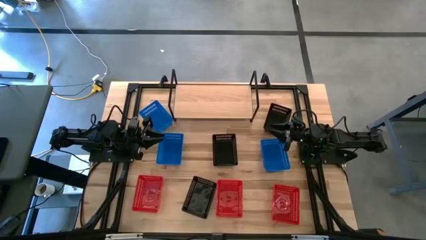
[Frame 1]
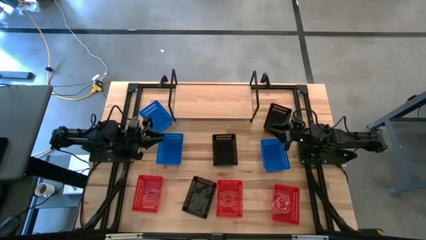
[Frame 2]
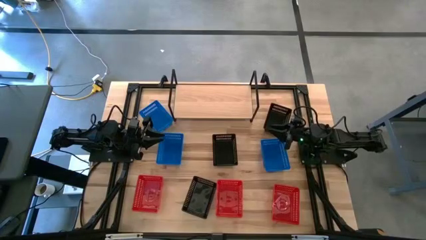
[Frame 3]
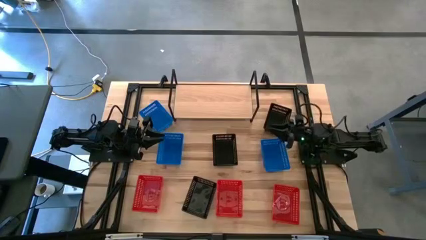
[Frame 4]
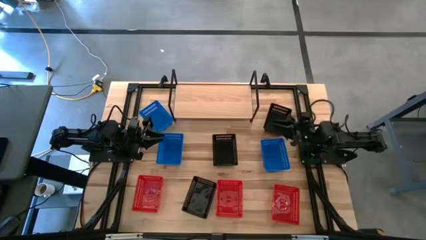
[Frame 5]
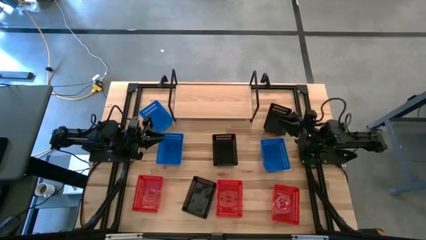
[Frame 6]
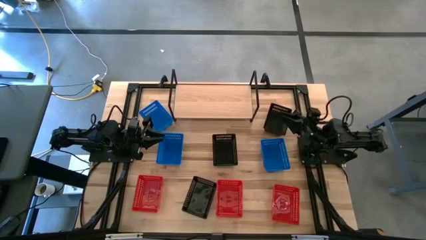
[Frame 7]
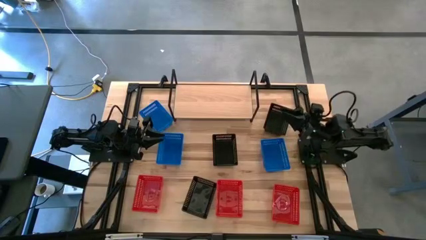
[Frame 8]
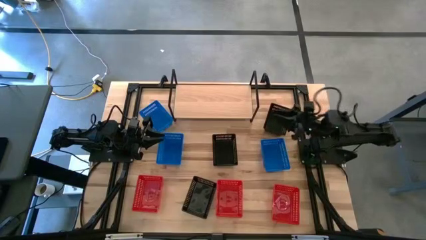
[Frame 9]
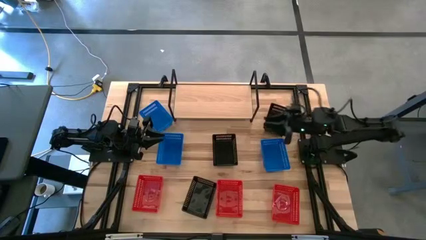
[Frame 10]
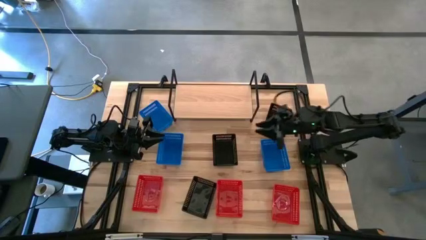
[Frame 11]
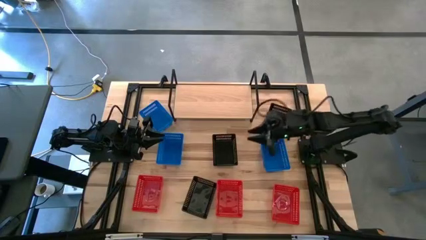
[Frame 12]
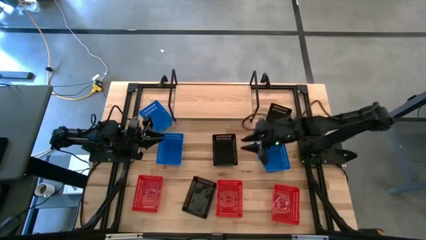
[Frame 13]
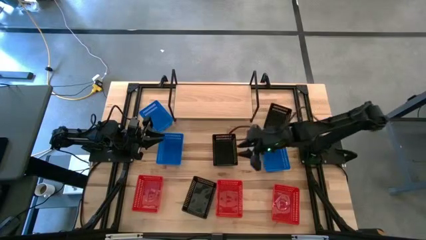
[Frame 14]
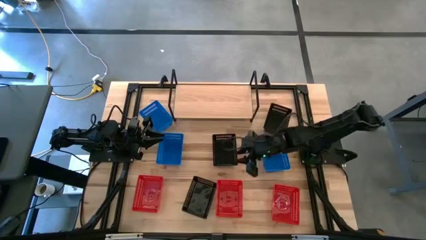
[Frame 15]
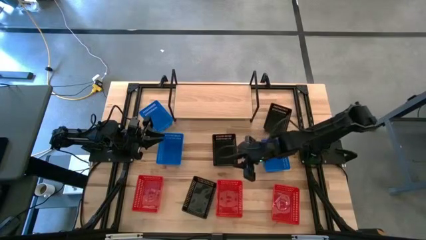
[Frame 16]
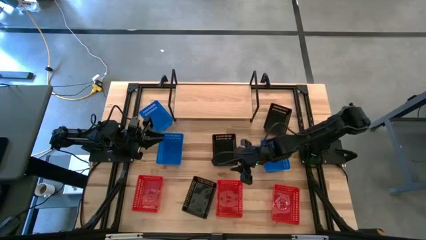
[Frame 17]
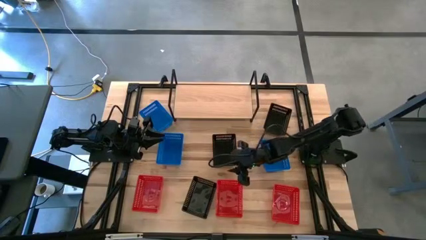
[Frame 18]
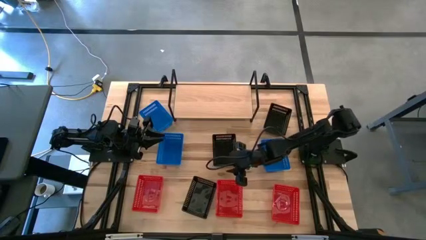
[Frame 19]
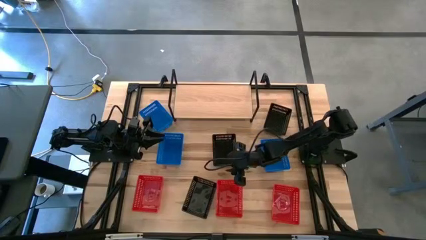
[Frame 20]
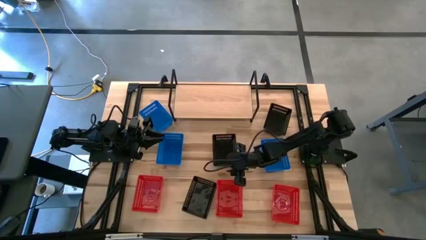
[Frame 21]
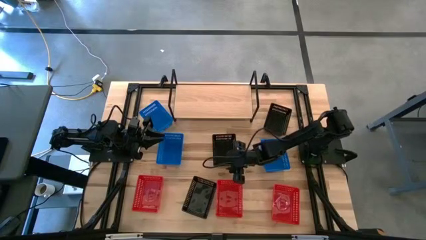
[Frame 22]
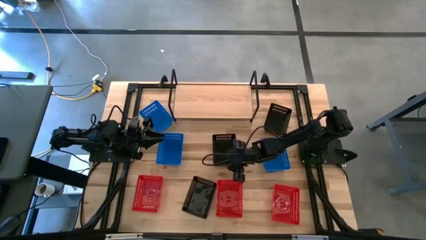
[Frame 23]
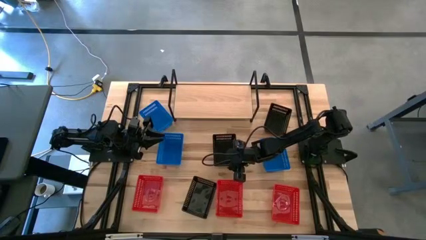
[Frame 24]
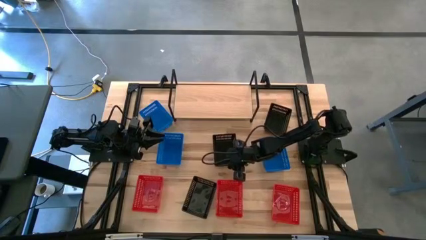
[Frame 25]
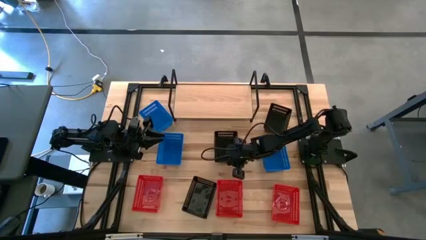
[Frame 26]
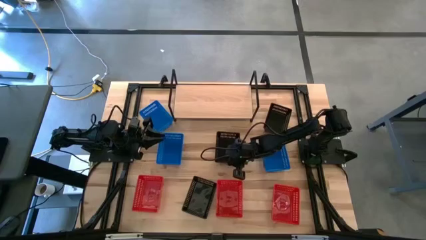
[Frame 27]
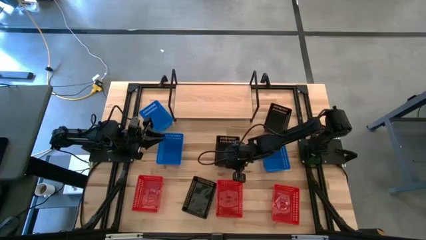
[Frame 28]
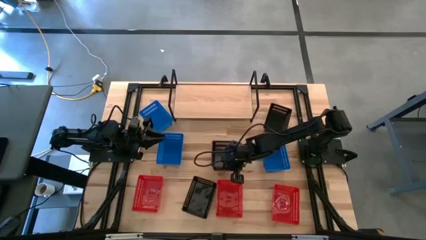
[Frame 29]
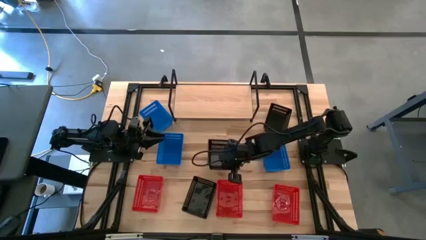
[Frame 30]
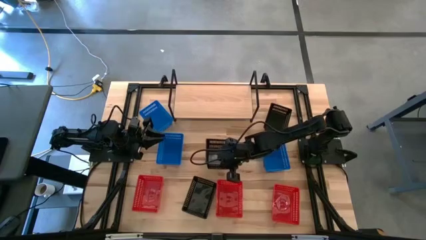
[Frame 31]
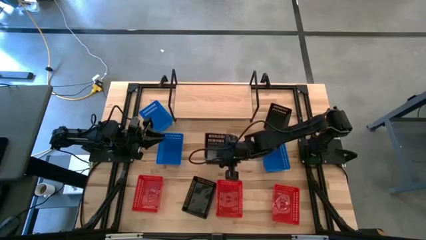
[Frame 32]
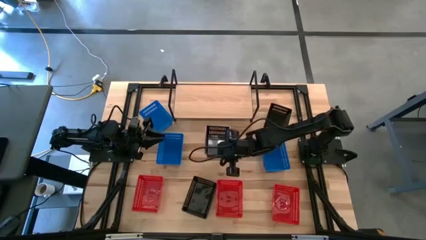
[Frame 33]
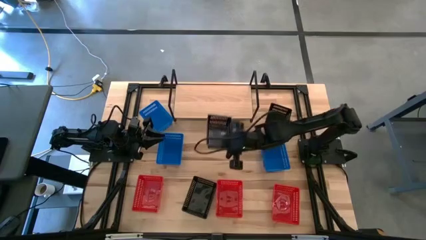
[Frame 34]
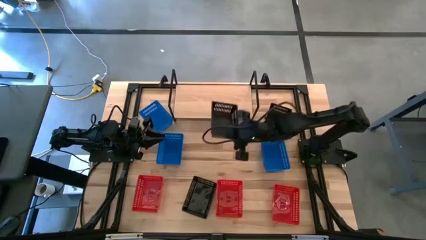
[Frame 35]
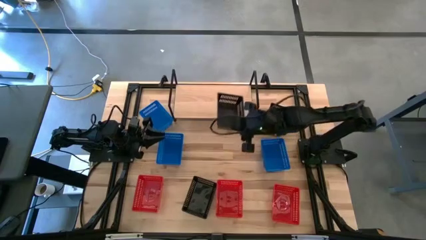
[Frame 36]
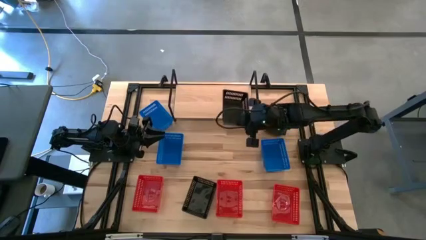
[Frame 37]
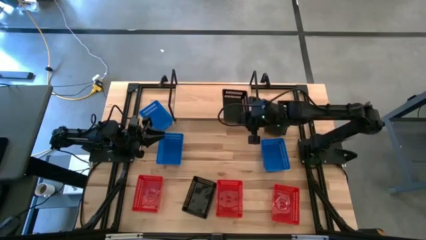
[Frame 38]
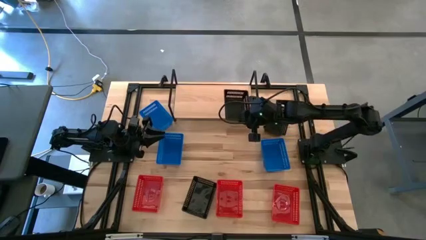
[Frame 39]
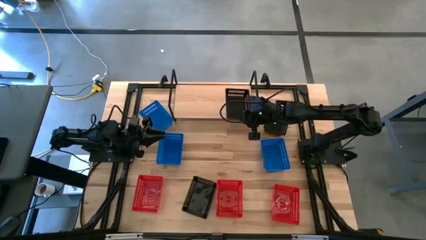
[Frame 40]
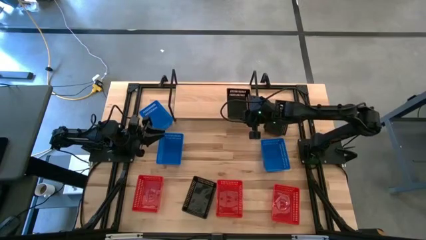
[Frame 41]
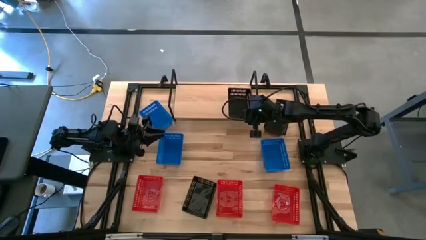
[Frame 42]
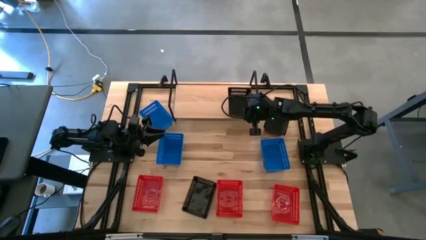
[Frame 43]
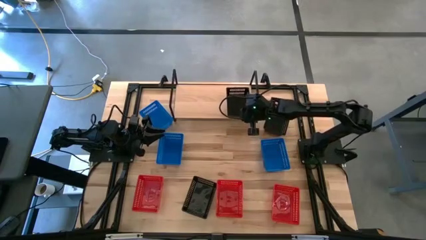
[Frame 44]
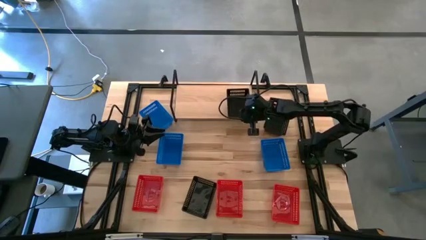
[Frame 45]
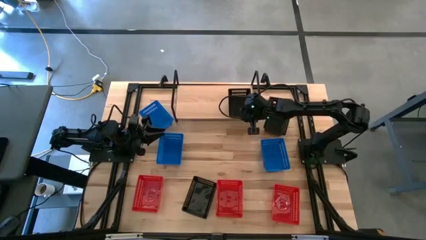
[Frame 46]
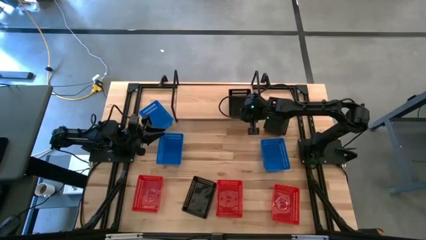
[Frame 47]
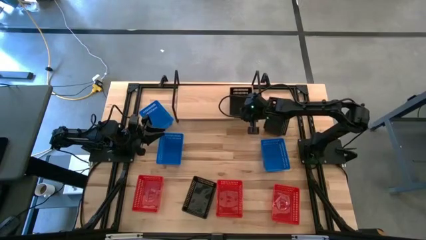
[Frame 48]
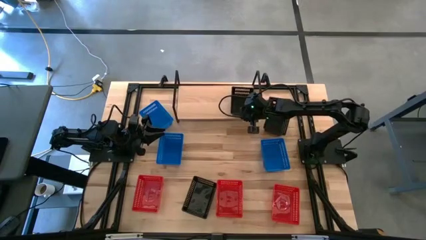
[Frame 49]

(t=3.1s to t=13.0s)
Task: Stack baskets on shelf by color
Put the middle black bin on the shelf

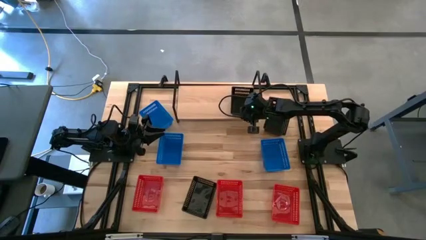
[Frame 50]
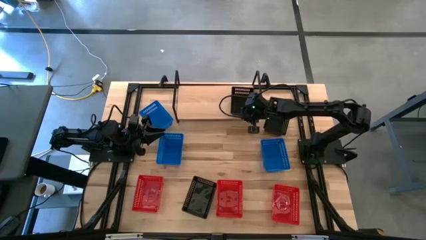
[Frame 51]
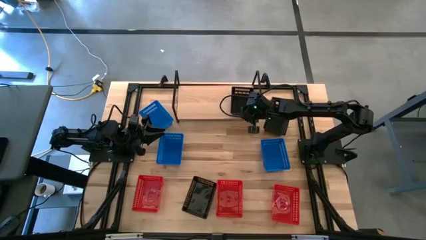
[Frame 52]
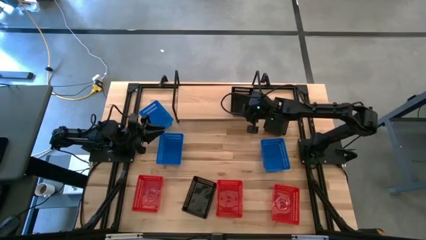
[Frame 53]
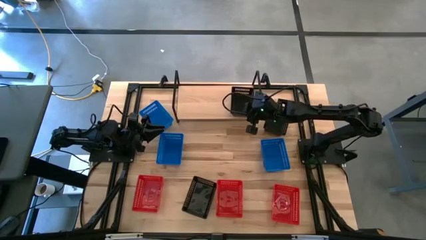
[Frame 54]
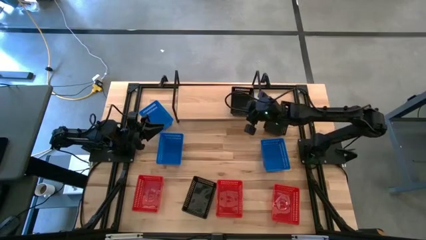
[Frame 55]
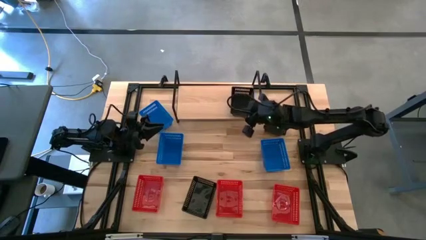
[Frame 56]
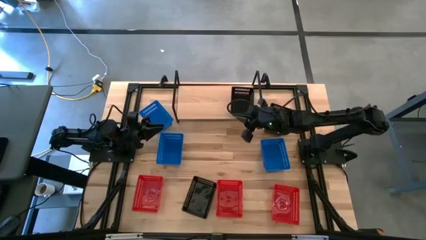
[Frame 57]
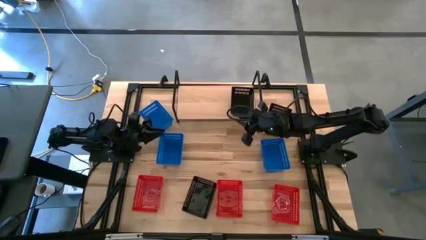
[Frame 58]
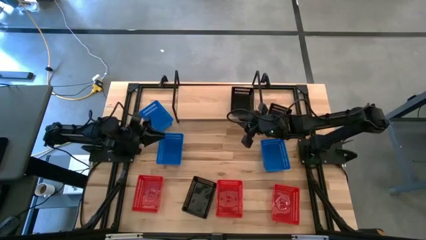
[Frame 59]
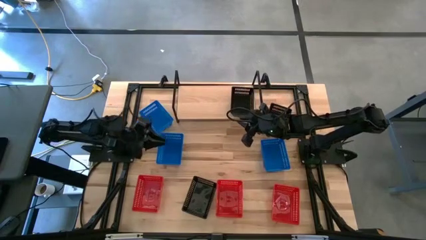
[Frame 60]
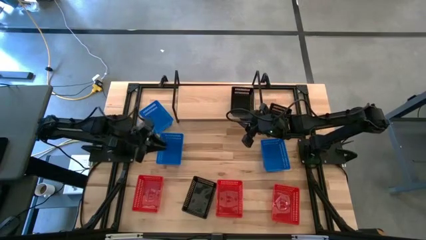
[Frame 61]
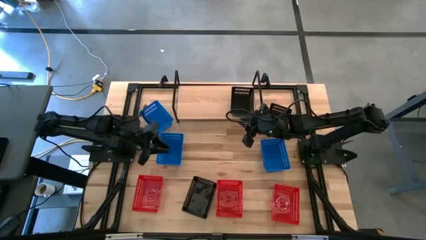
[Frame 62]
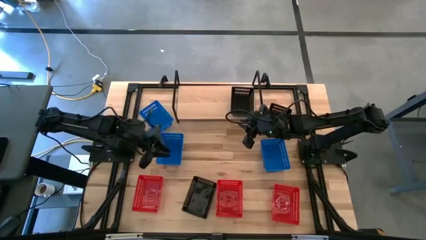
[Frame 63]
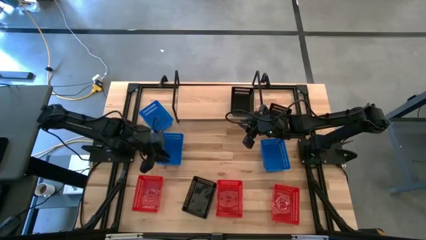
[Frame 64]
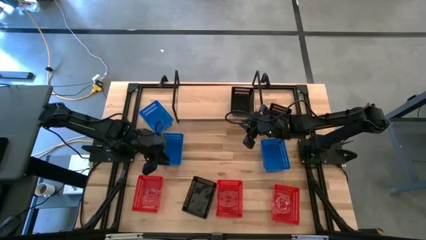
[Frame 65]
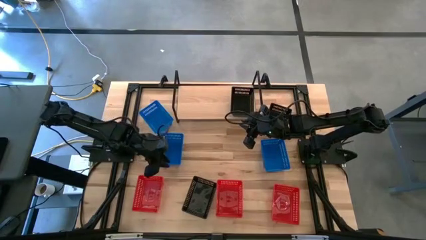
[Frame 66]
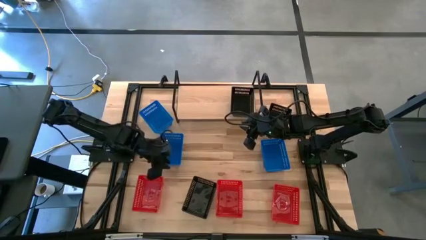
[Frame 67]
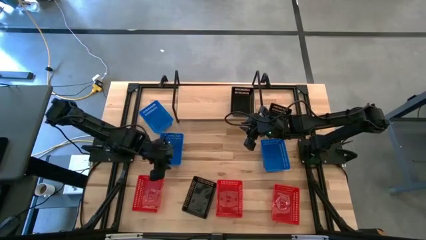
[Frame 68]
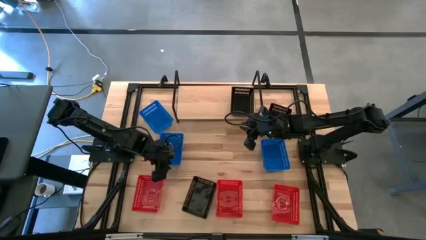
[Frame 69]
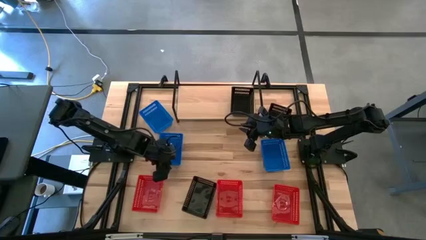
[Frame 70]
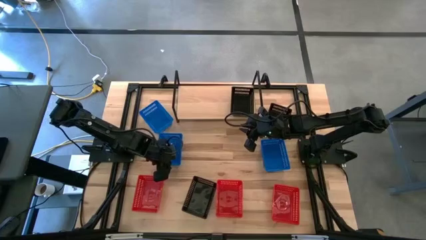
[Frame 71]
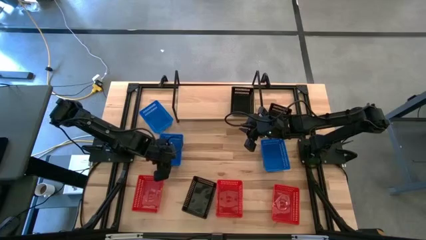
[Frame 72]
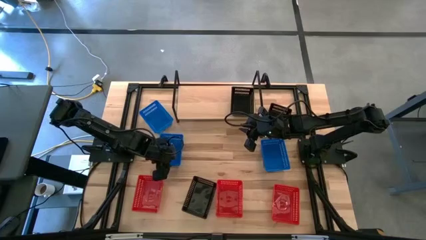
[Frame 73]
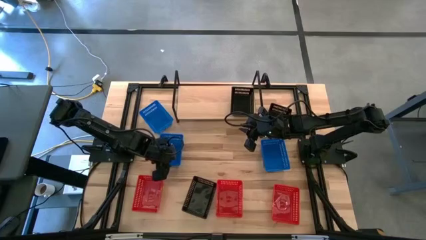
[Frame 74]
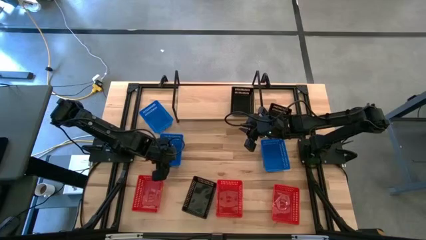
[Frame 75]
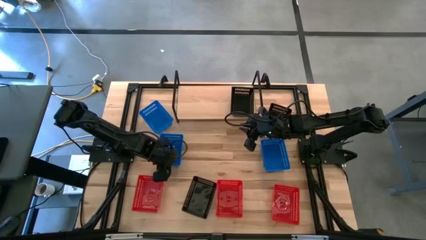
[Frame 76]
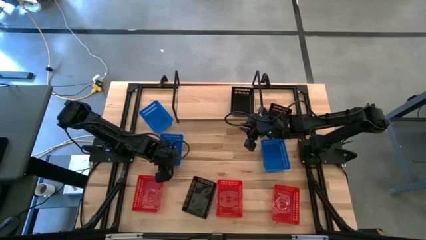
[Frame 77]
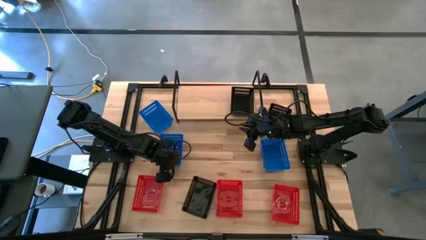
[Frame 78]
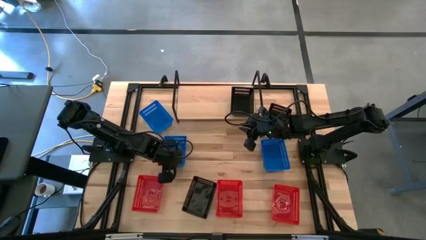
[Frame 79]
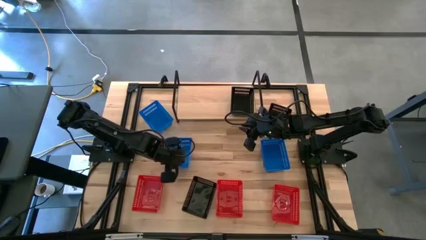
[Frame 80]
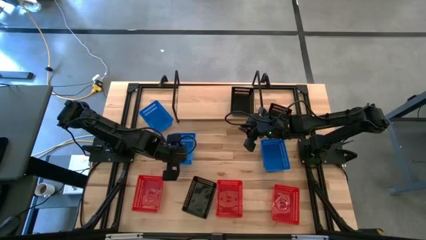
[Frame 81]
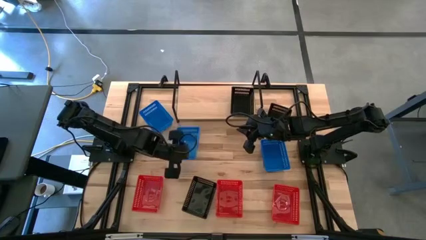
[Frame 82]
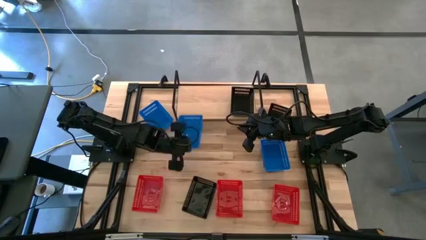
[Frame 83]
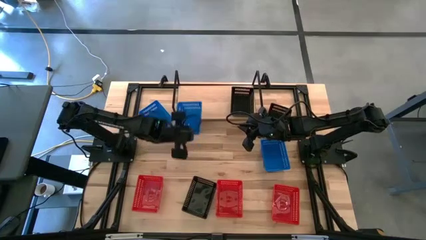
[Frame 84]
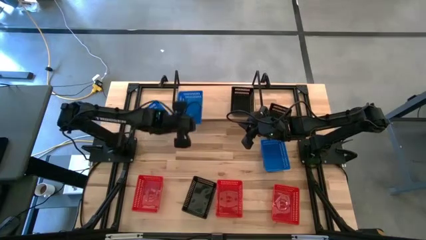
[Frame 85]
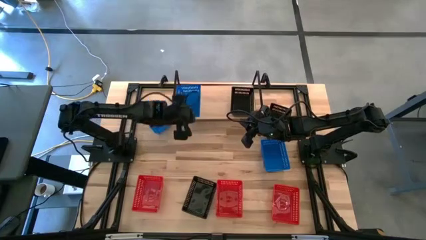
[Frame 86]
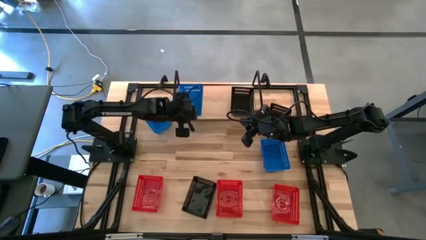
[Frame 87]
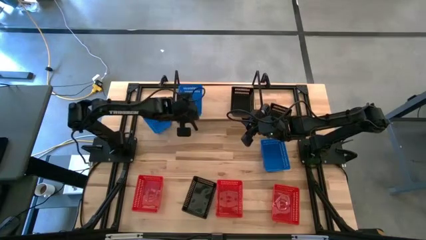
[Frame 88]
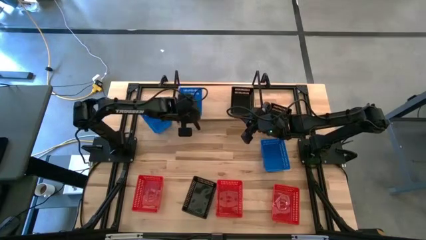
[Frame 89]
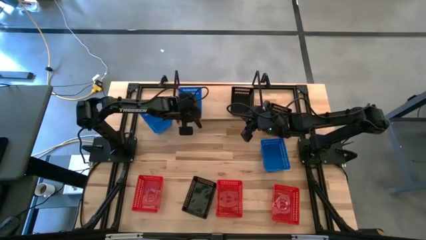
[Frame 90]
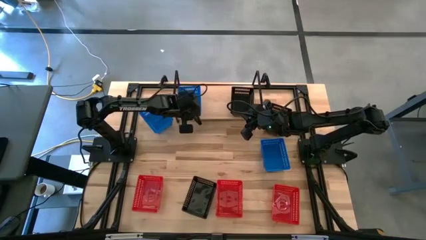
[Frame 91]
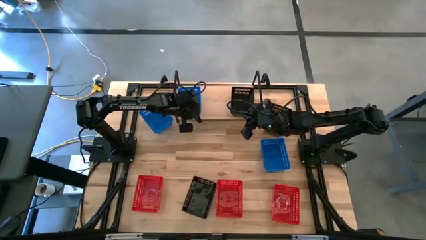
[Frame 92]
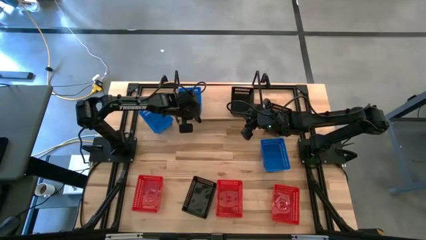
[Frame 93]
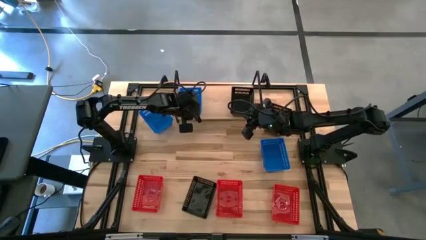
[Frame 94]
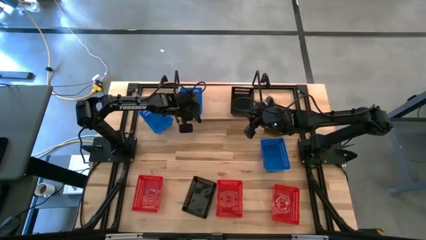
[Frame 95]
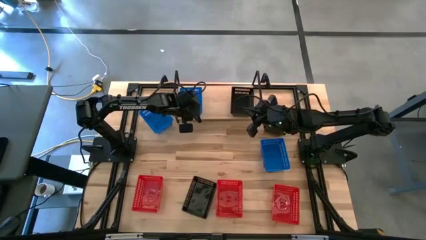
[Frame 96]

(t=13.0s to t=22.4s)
Put the bottom left blue bin on the shelf
